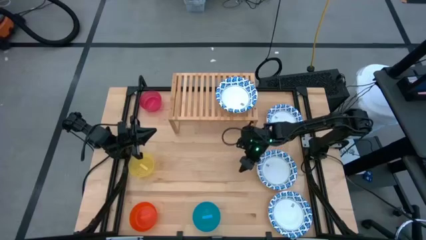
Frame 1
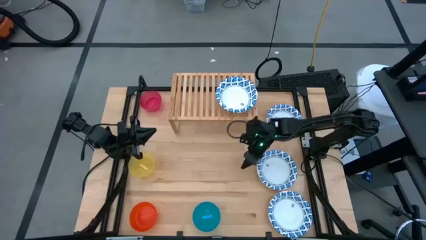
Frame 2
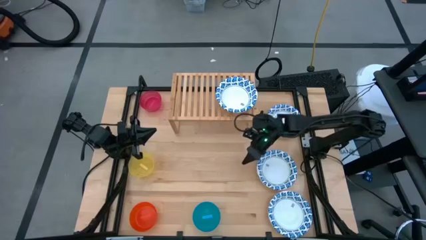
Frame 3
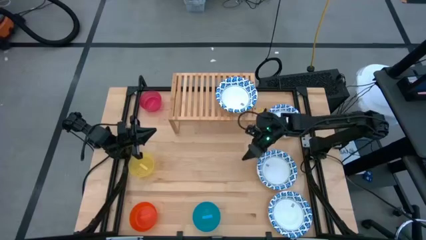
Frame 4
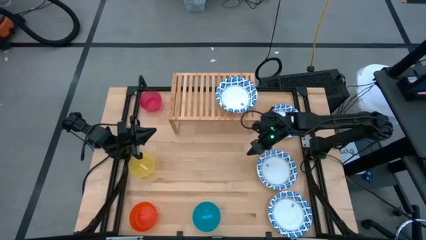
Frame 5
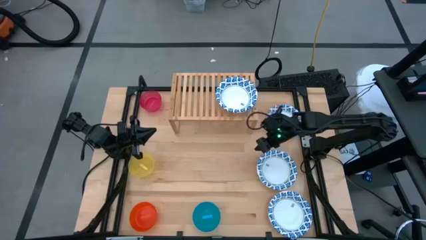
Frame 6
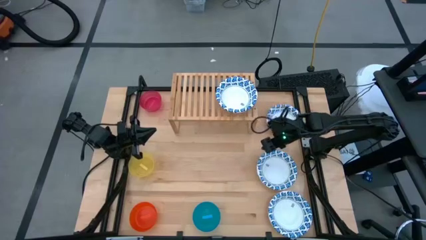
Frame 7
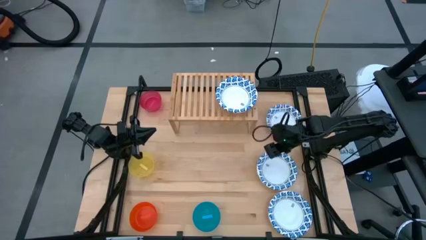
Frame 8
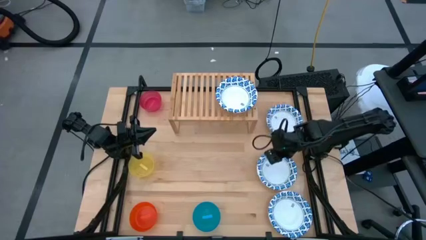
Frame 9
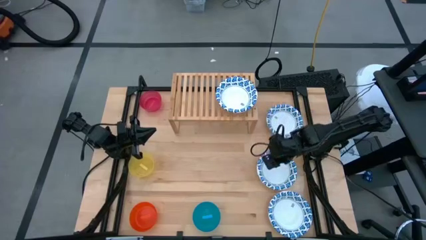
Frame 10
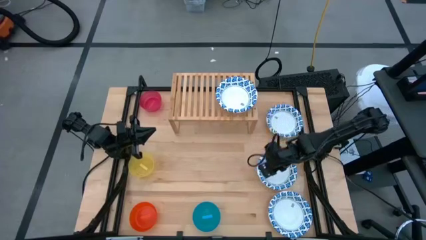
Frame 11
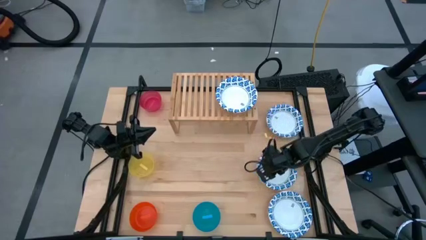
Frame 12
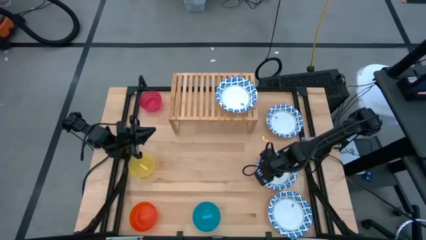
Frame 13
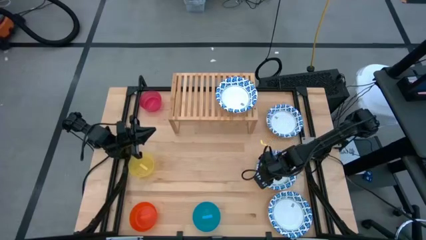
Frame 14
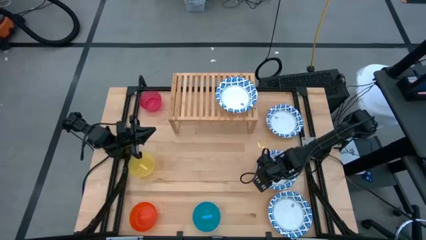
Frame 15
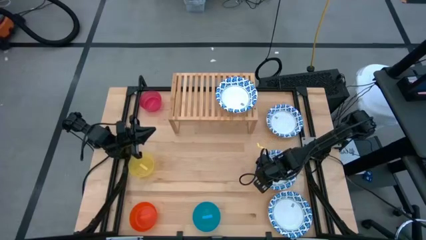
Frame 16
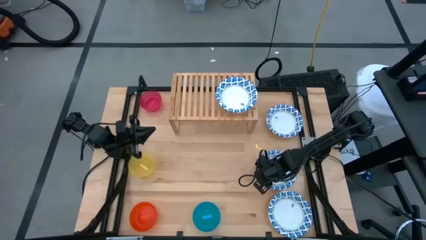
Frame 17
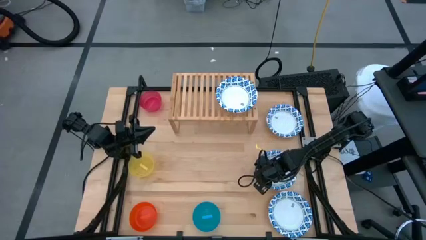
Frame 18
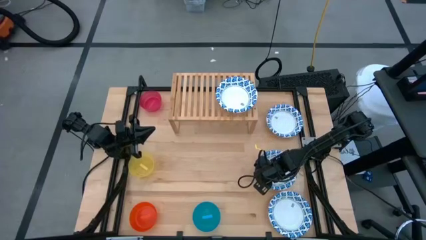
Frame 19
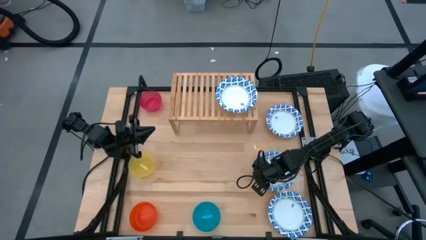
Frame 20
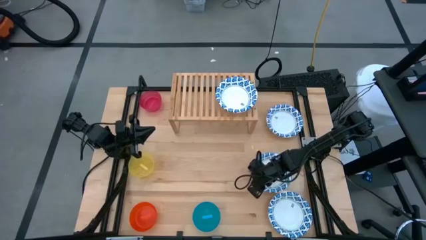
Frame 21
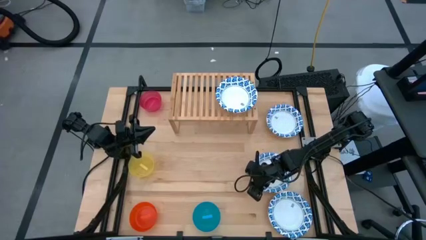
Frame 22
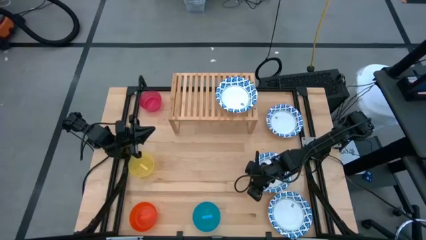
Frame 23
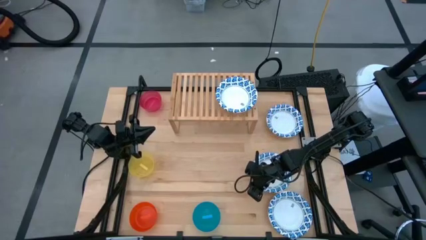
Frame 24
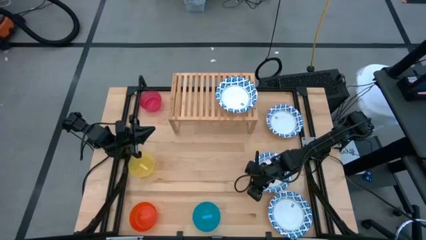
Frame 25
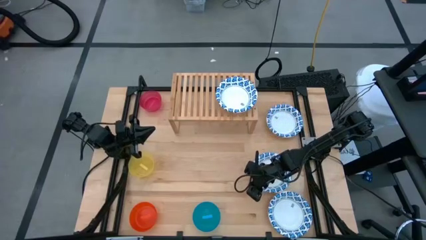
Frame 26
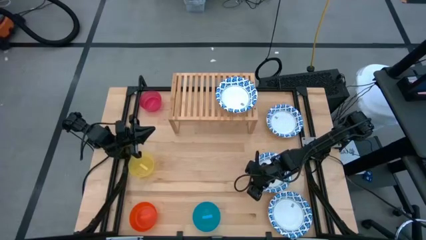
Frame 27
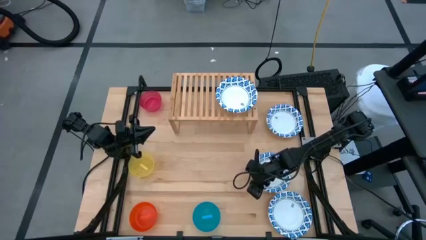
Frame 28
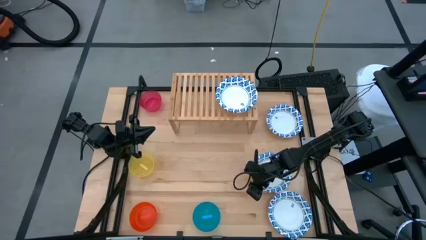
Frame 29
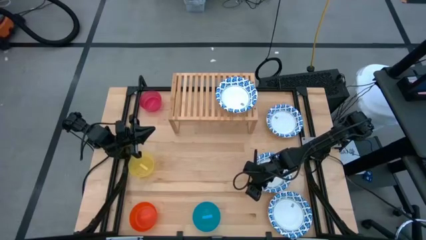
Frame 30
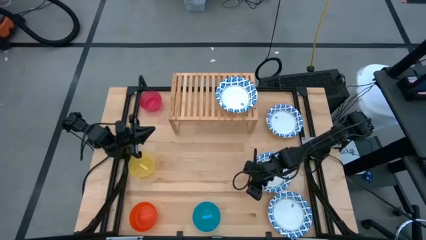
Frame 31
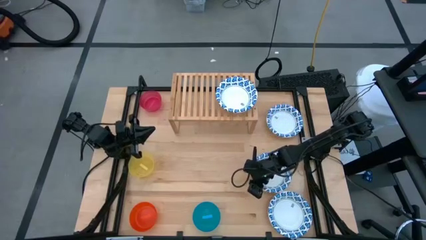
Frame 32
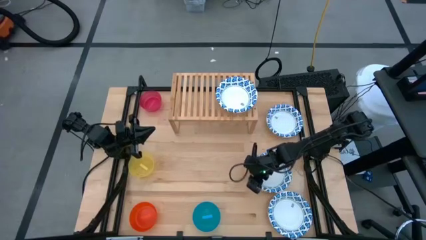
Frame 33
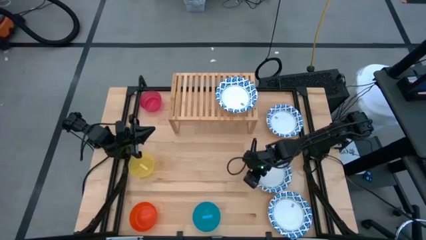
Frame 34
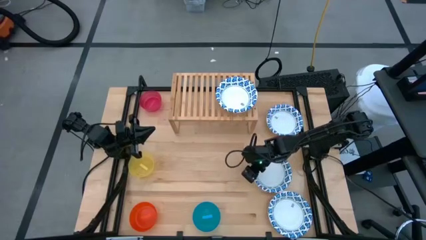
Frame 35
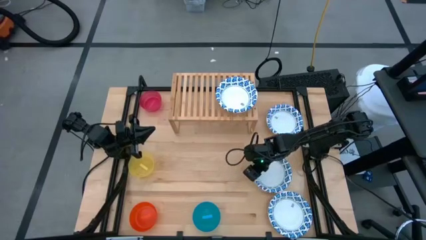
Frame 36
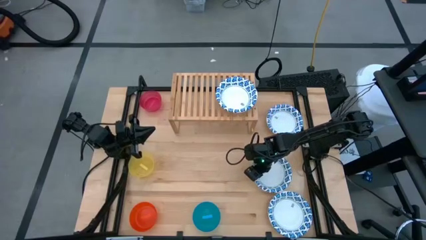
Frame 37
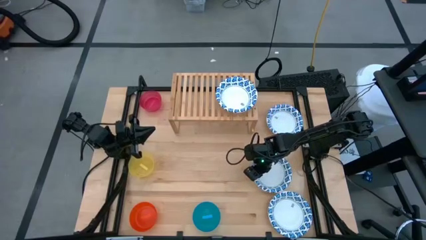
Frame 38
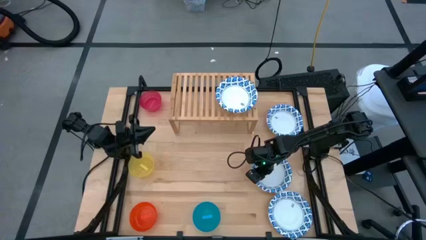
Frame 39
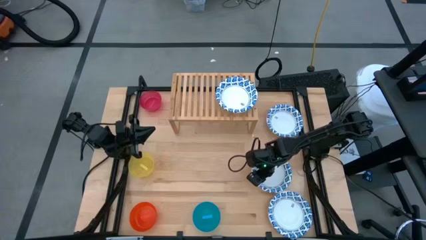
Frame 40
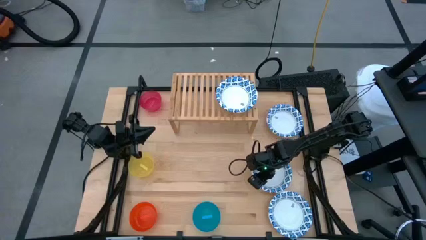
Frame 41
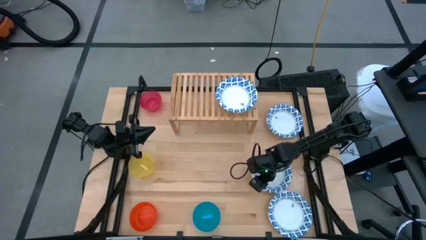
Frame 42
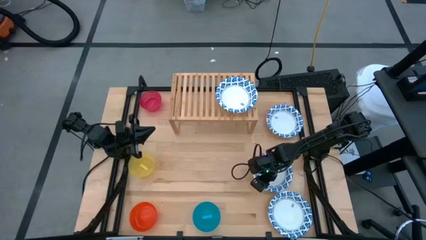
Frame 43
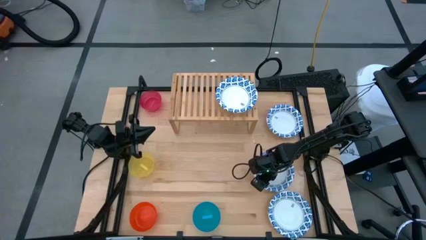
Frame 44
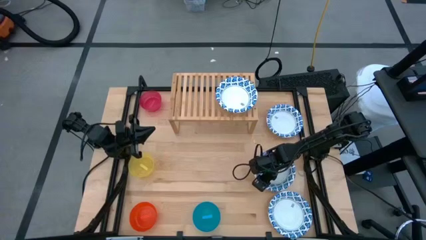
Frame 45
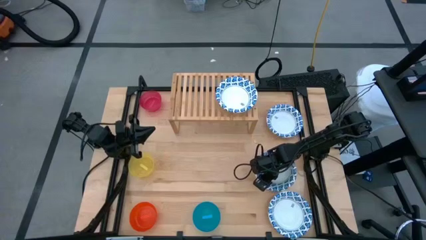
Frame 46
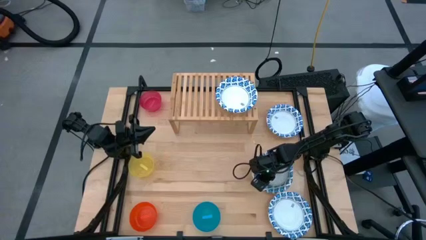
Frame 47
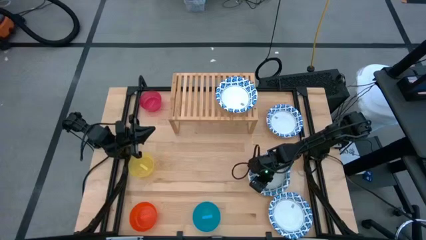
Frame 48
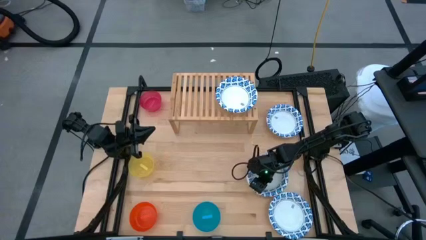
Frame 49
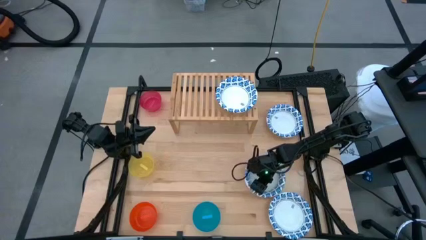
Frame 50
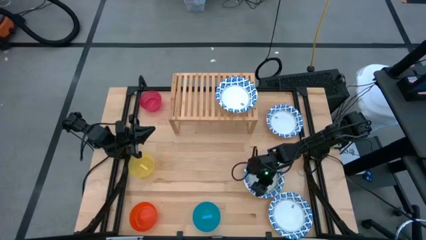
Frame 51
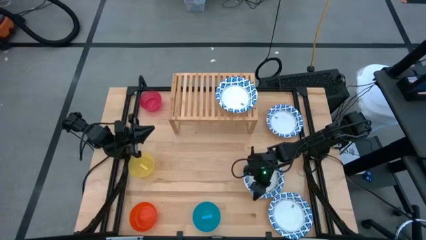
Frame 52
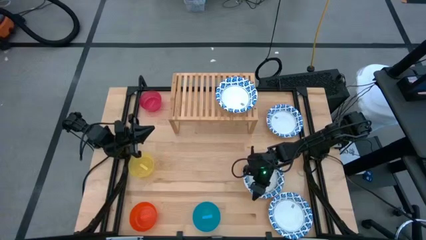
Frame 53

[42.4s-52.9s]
Task: Place and stack bowls onto a shelf
Stack the white bowl on top of the white bowl on the shelf
